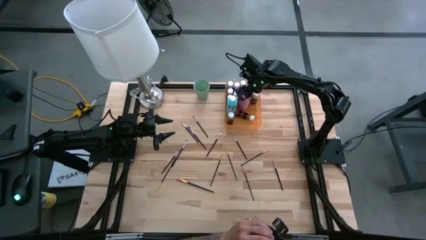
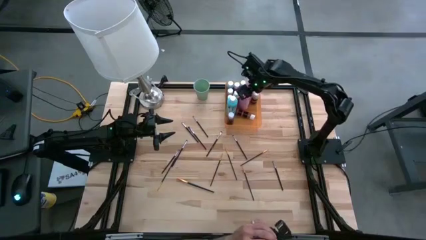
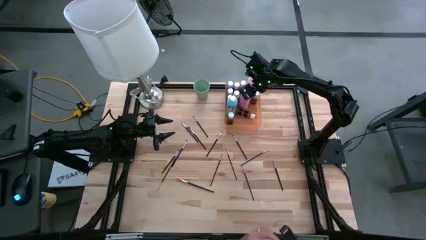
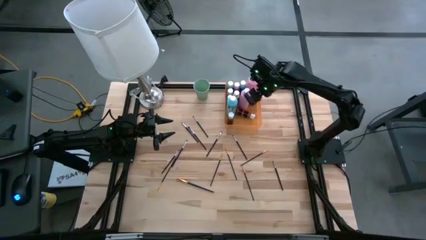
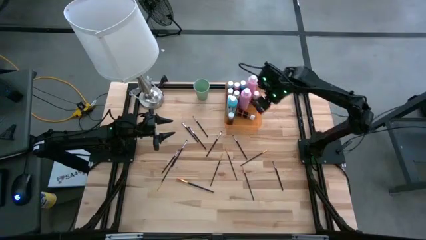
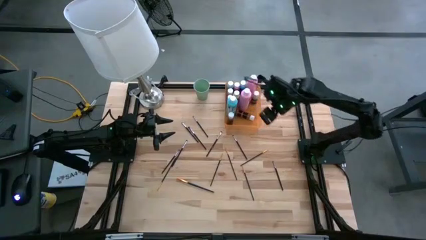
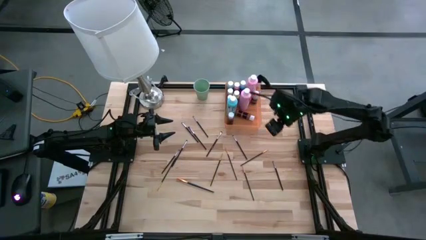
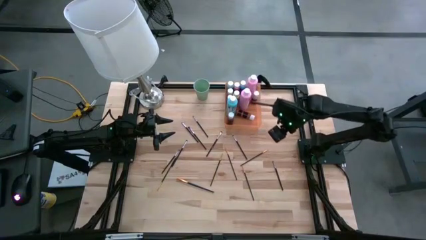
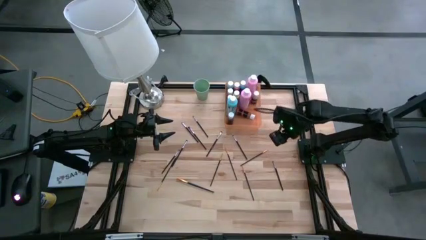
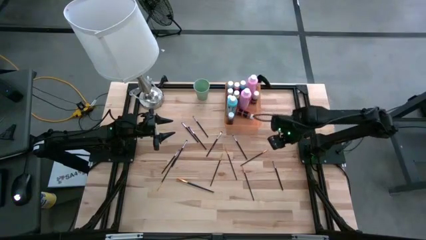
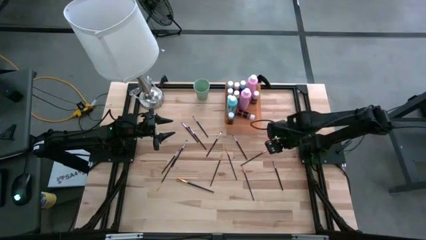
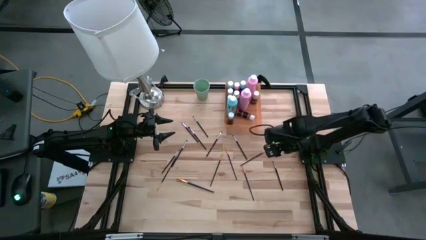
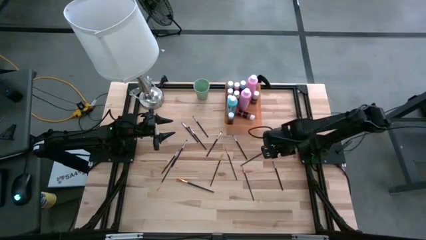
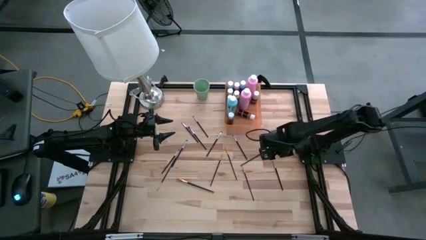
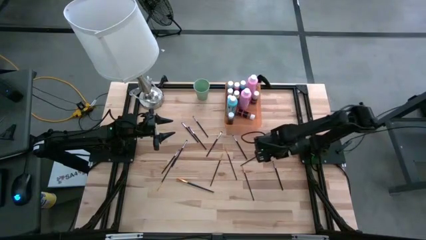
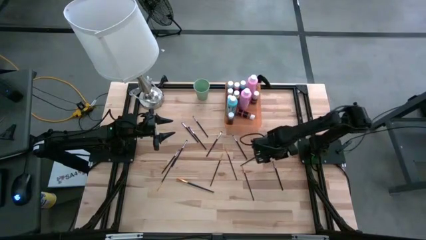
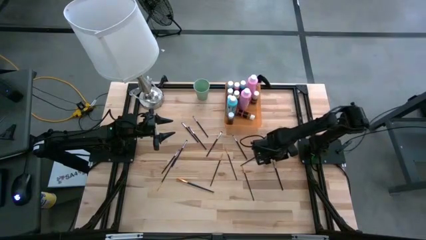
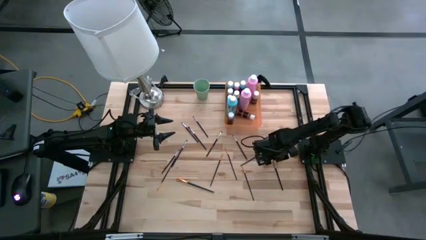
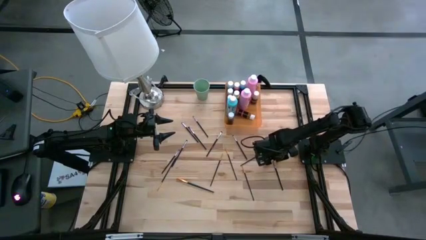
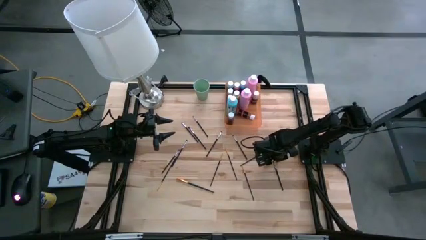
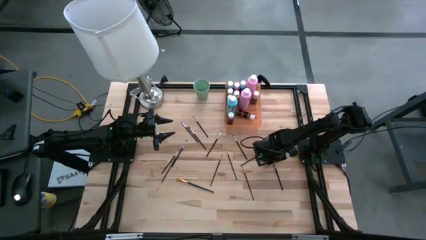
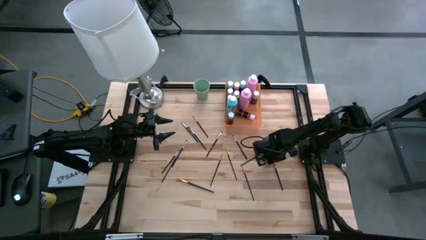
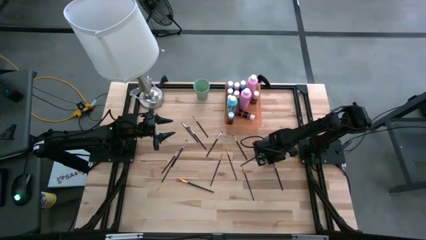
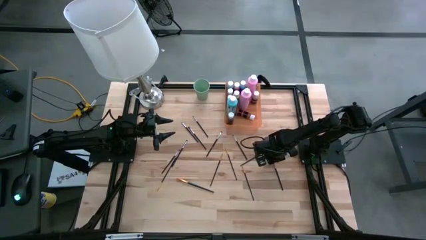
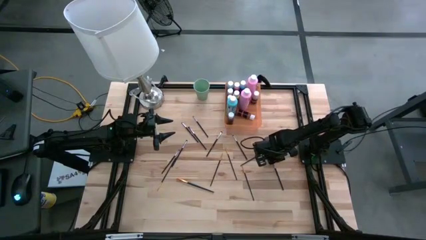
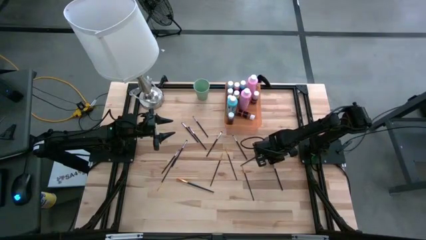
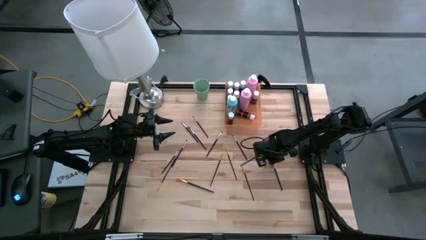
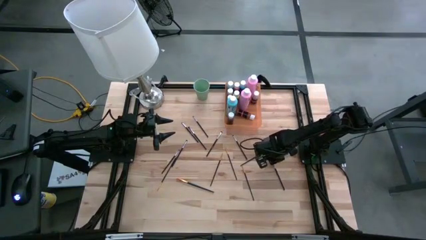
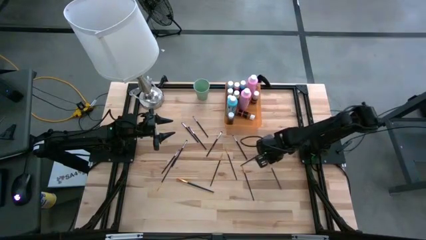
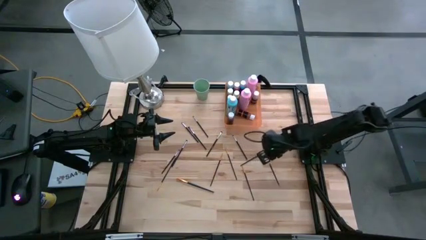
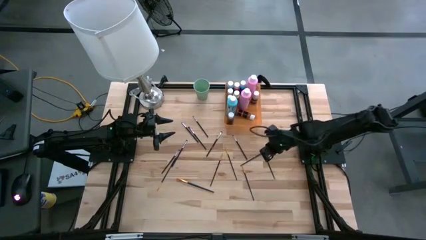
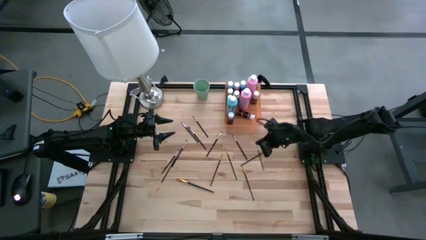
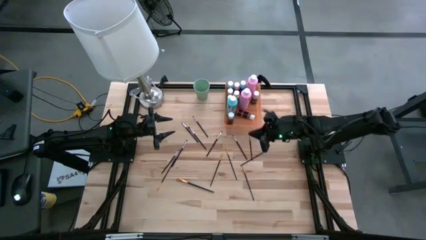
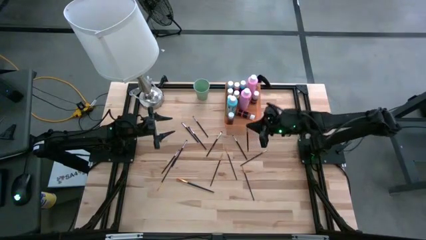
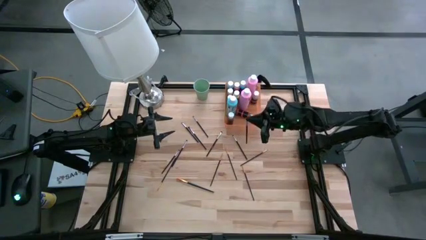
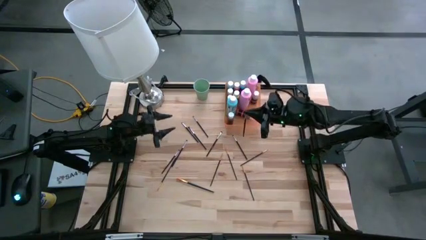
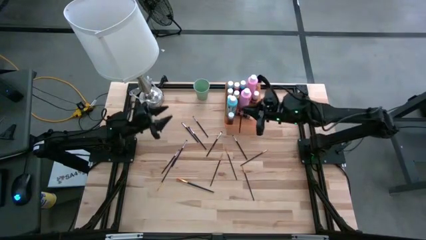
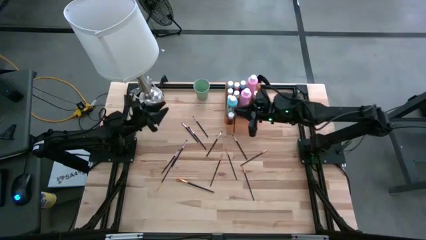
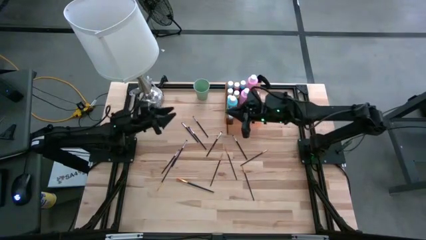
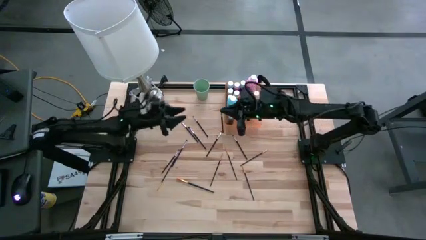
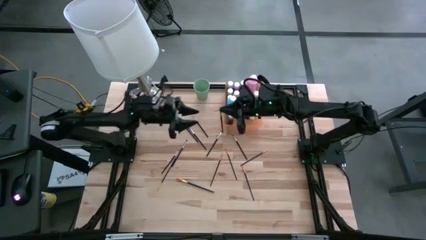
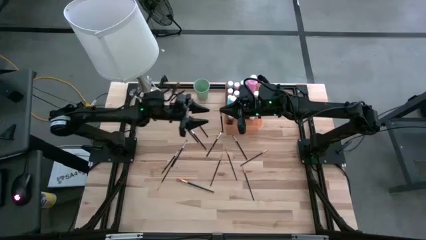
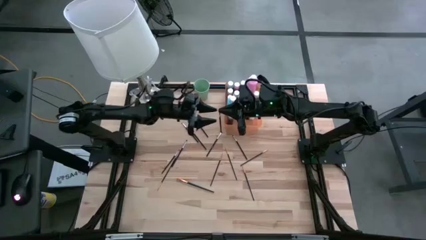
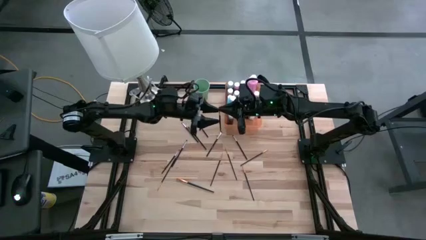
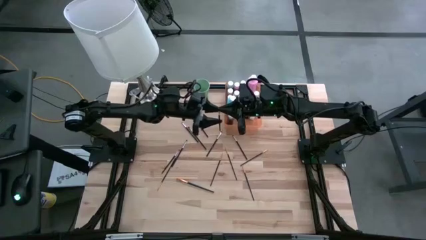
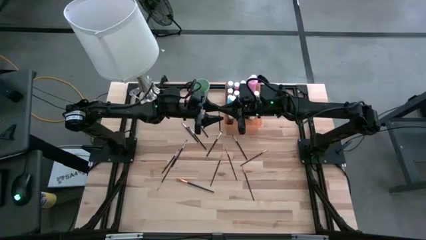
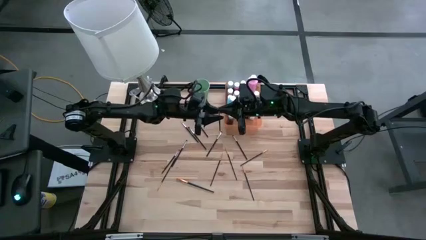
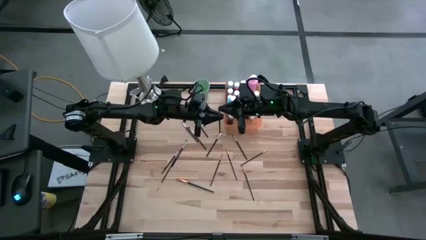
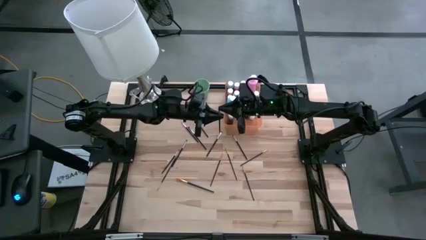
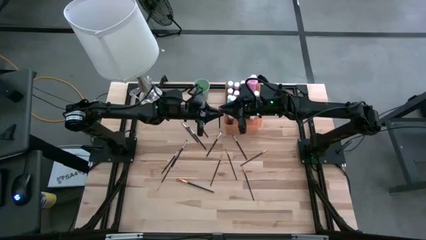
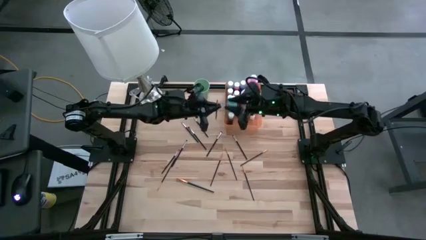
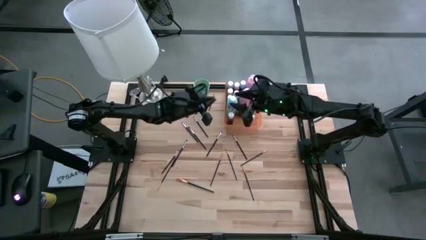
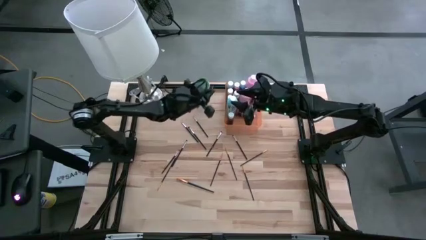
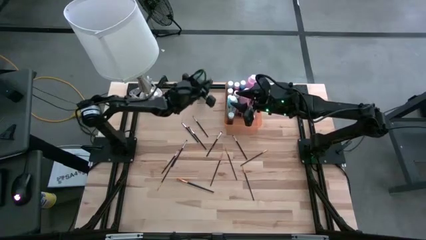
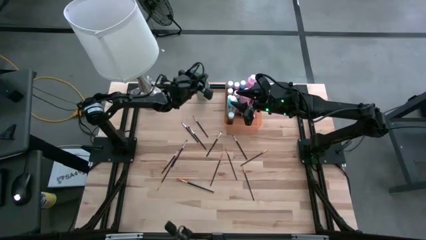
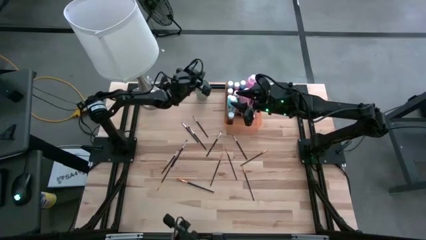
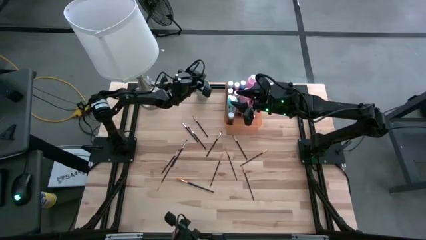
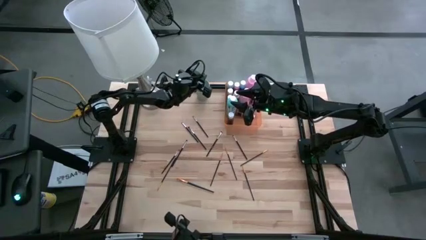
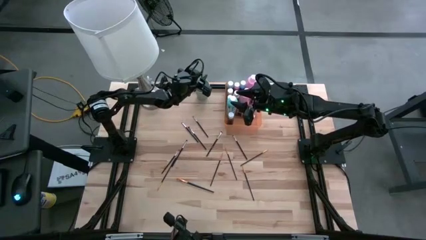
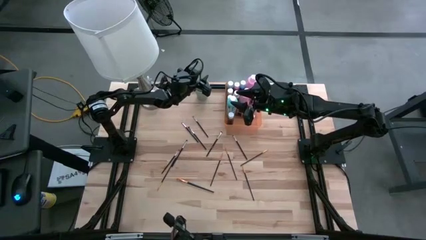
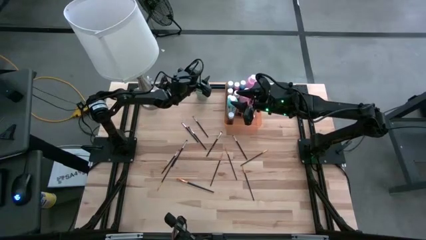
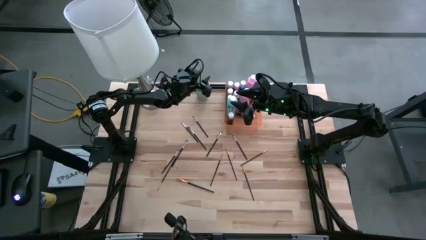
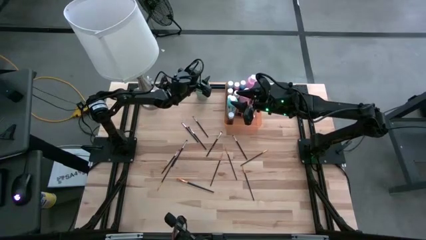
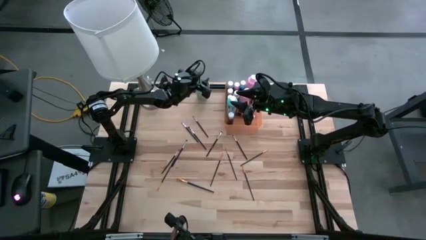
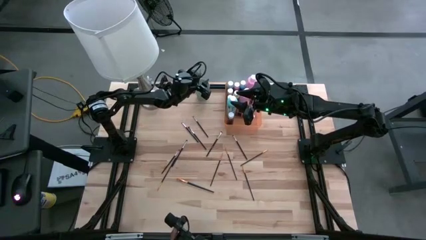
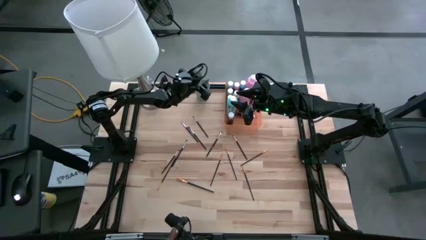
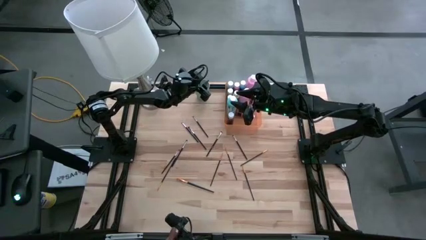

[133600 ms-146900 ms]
Task: Pick & Place Paint Supplies
Put the black paint brush into the green cup
